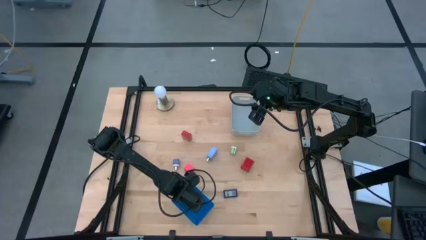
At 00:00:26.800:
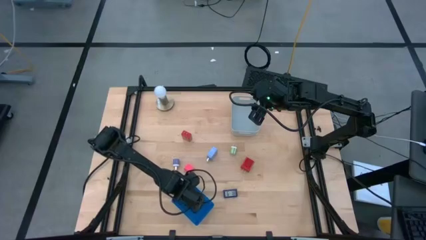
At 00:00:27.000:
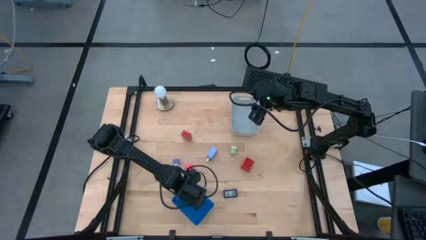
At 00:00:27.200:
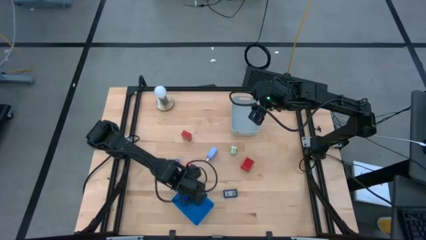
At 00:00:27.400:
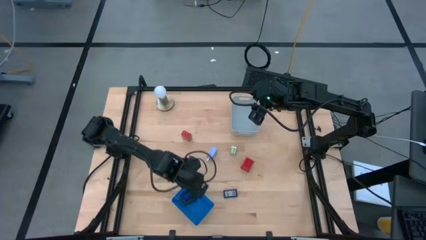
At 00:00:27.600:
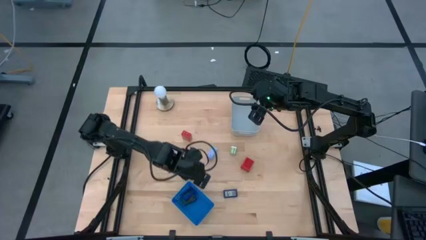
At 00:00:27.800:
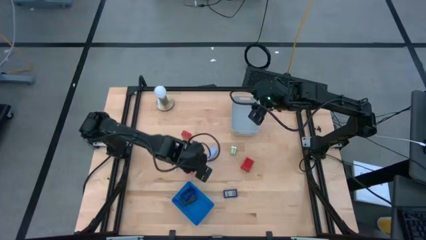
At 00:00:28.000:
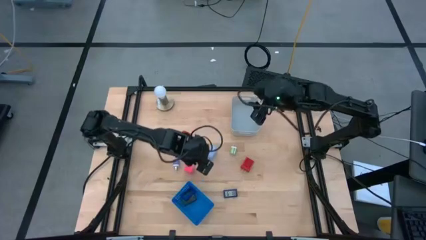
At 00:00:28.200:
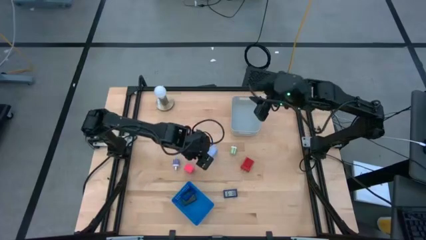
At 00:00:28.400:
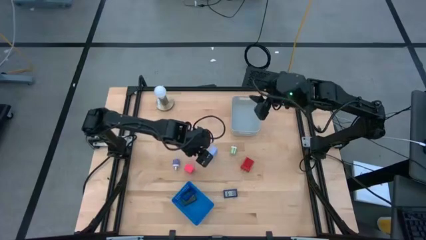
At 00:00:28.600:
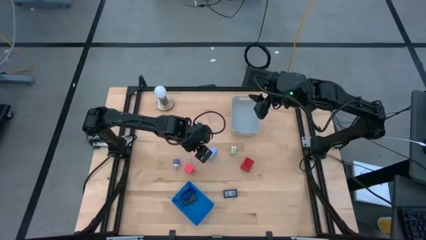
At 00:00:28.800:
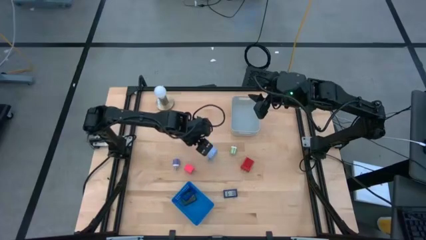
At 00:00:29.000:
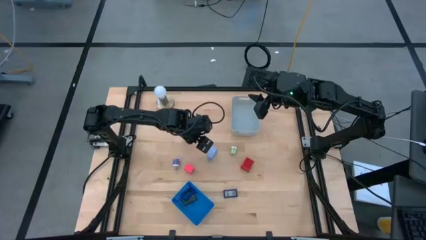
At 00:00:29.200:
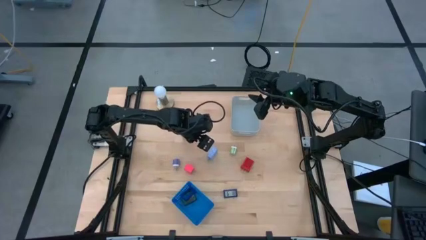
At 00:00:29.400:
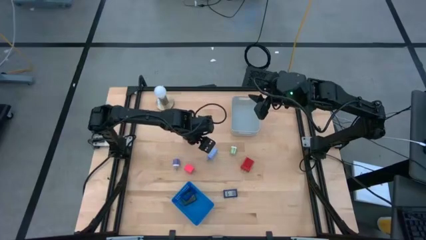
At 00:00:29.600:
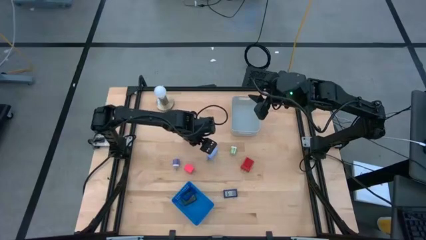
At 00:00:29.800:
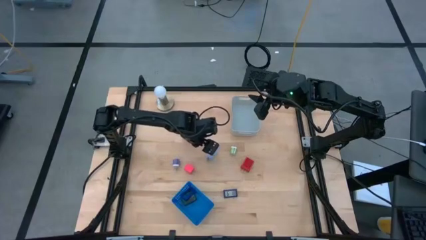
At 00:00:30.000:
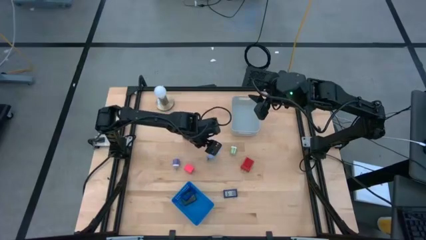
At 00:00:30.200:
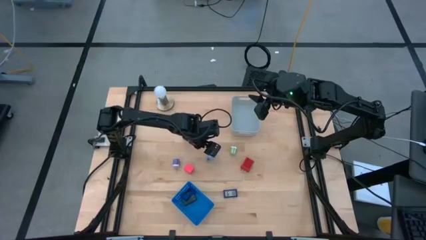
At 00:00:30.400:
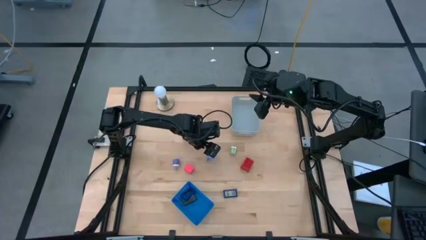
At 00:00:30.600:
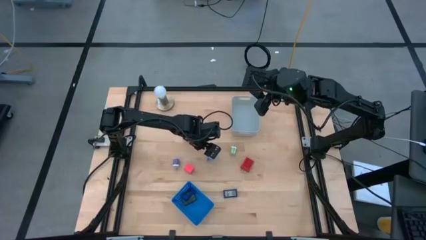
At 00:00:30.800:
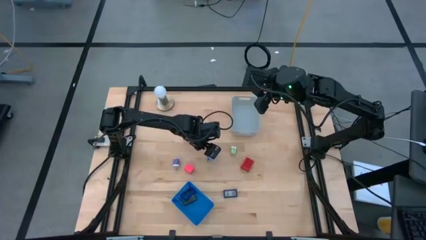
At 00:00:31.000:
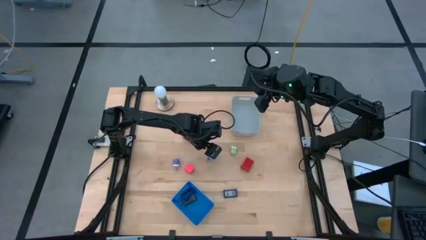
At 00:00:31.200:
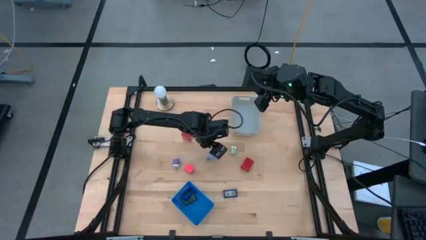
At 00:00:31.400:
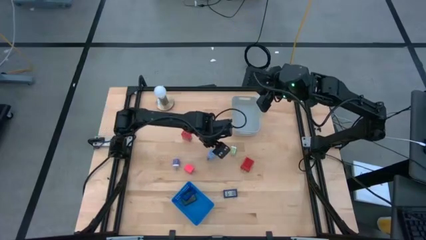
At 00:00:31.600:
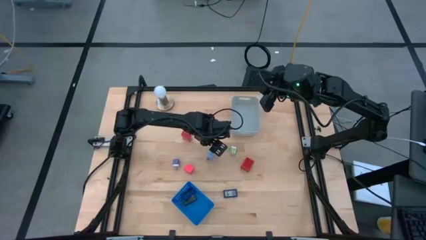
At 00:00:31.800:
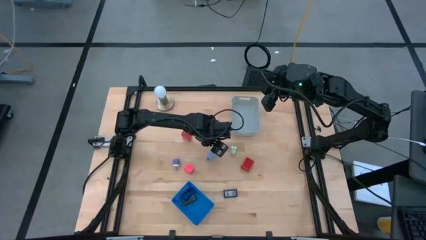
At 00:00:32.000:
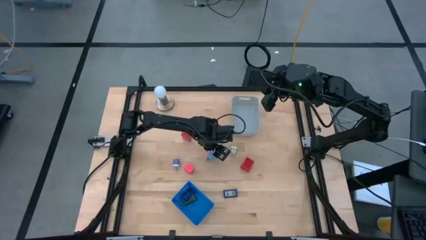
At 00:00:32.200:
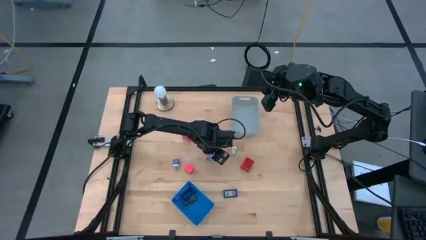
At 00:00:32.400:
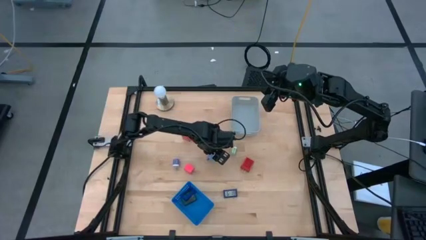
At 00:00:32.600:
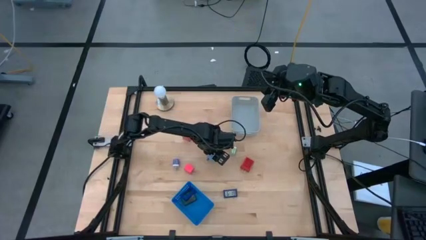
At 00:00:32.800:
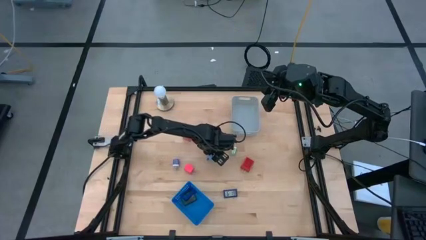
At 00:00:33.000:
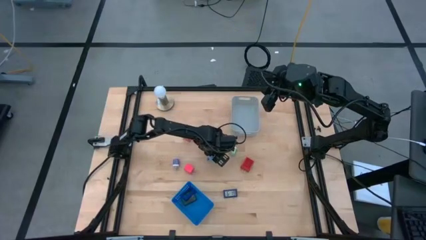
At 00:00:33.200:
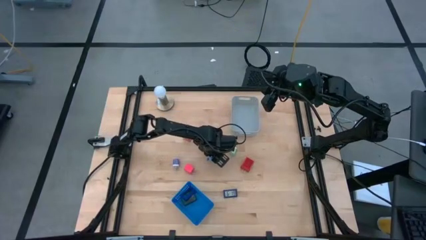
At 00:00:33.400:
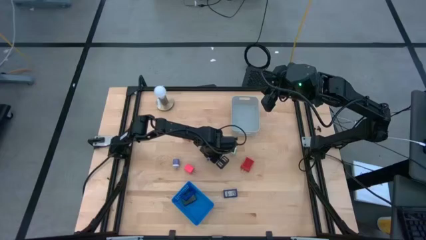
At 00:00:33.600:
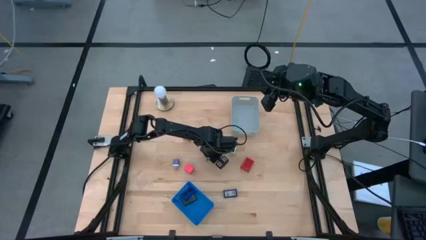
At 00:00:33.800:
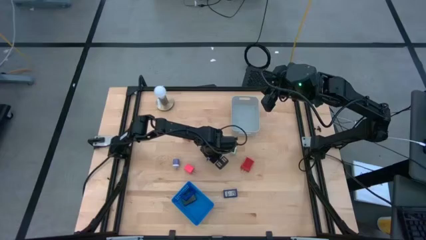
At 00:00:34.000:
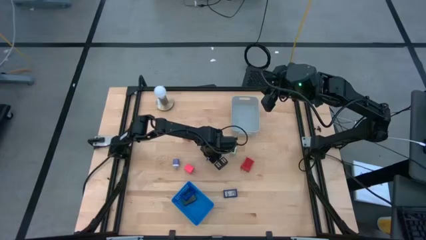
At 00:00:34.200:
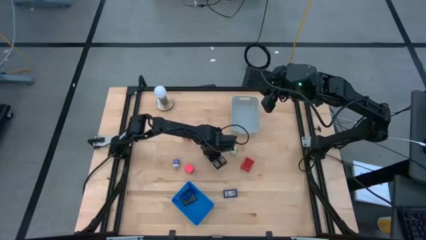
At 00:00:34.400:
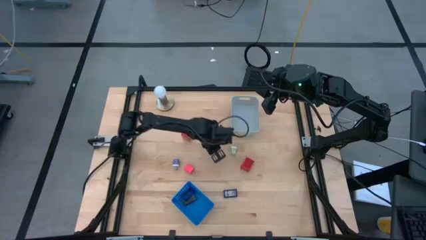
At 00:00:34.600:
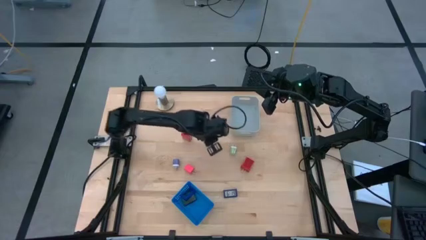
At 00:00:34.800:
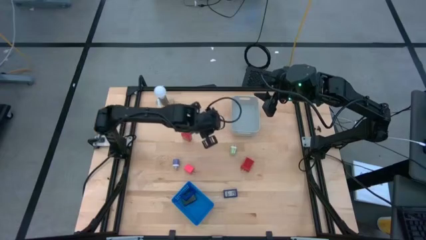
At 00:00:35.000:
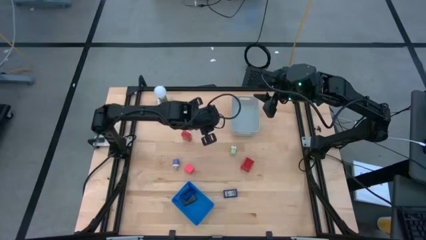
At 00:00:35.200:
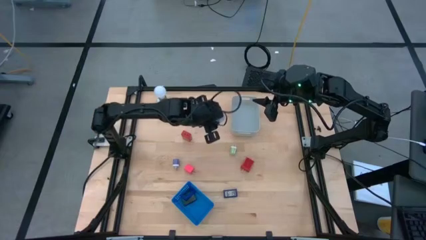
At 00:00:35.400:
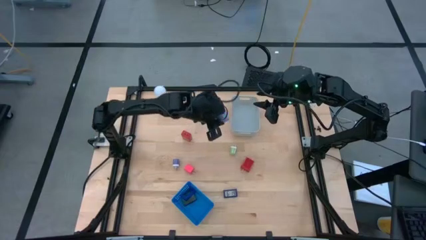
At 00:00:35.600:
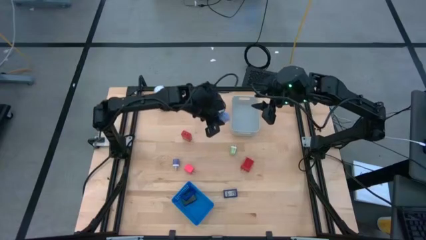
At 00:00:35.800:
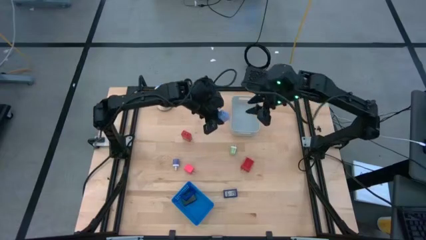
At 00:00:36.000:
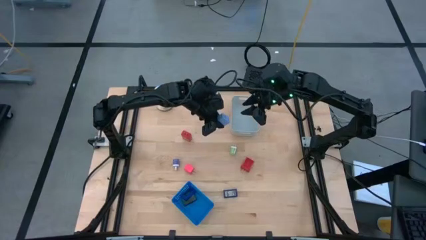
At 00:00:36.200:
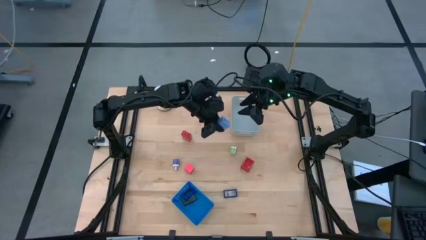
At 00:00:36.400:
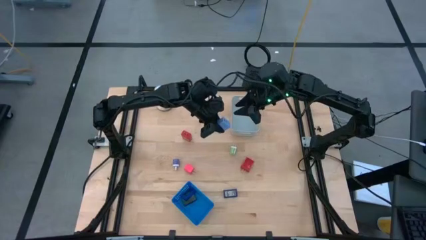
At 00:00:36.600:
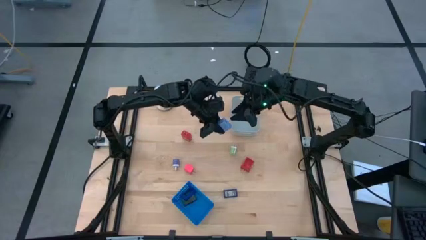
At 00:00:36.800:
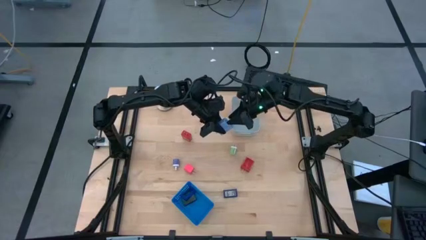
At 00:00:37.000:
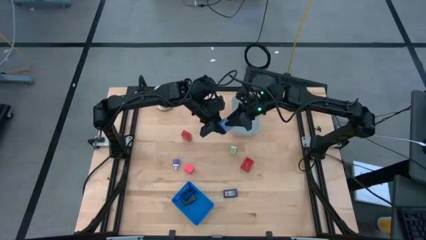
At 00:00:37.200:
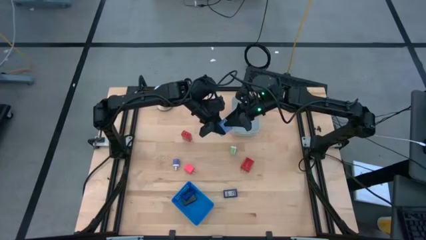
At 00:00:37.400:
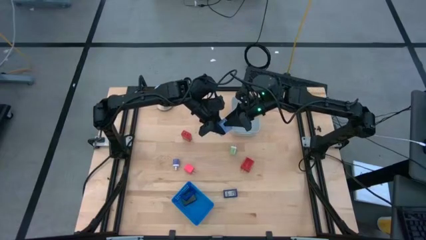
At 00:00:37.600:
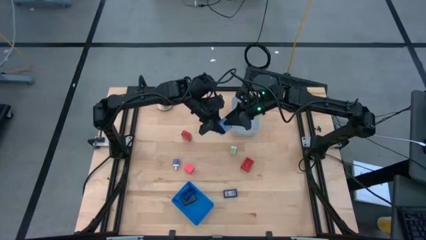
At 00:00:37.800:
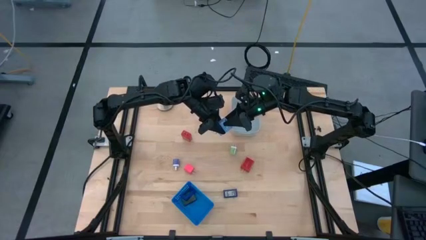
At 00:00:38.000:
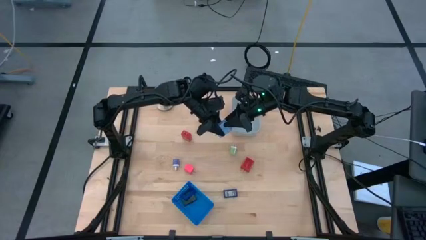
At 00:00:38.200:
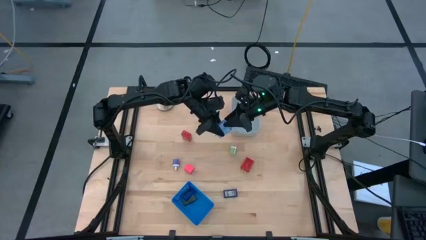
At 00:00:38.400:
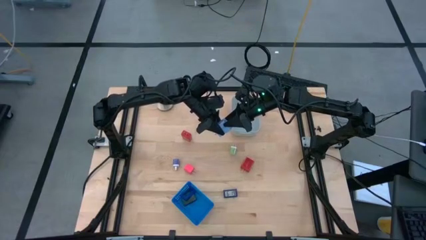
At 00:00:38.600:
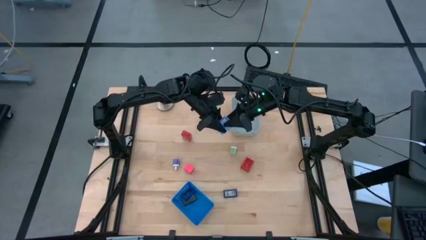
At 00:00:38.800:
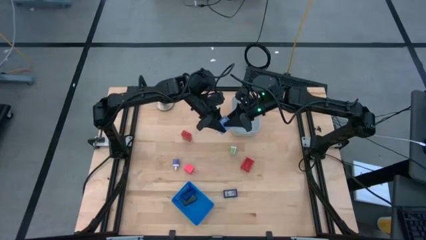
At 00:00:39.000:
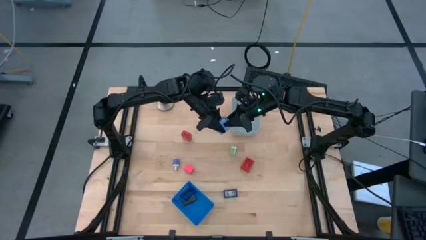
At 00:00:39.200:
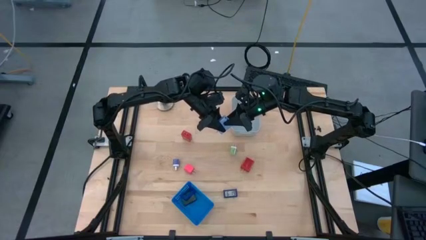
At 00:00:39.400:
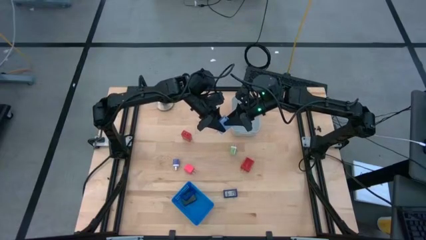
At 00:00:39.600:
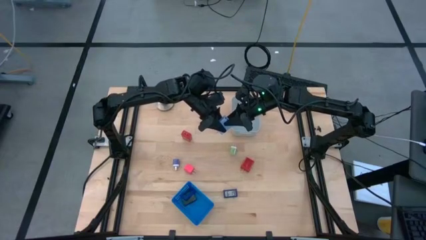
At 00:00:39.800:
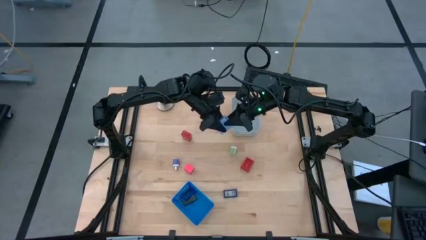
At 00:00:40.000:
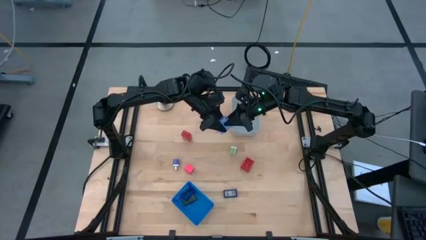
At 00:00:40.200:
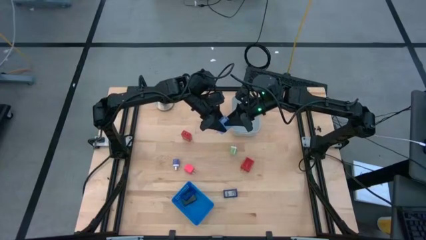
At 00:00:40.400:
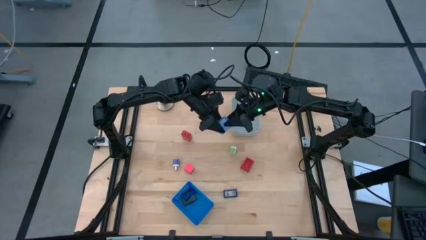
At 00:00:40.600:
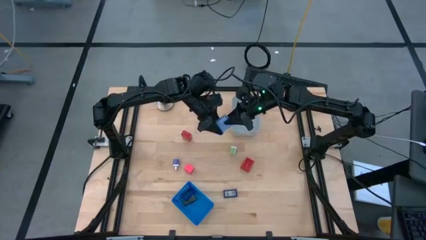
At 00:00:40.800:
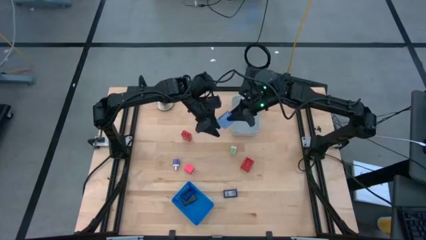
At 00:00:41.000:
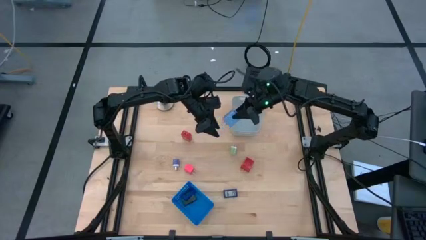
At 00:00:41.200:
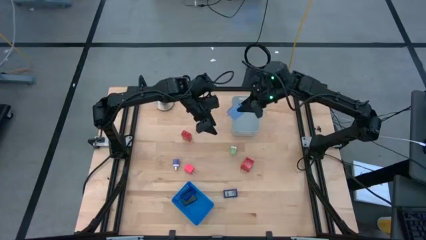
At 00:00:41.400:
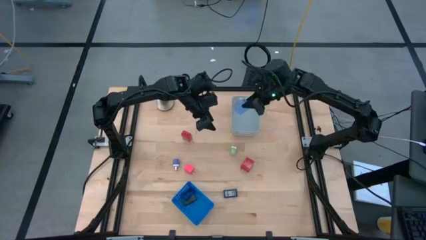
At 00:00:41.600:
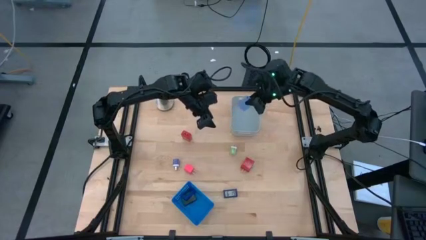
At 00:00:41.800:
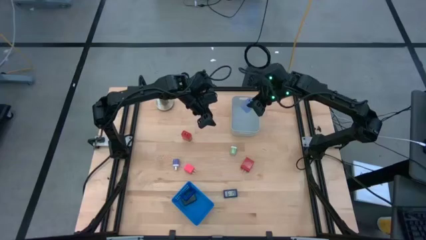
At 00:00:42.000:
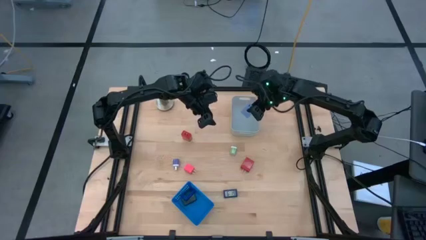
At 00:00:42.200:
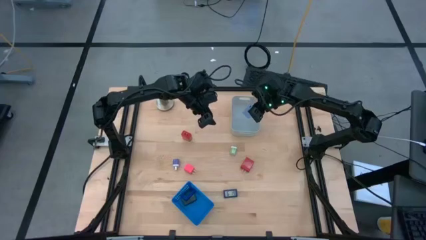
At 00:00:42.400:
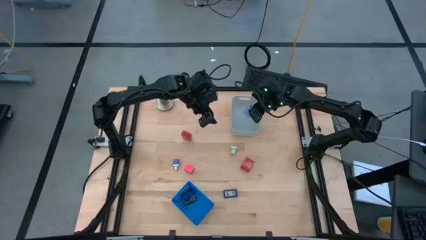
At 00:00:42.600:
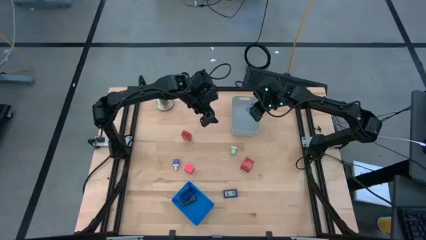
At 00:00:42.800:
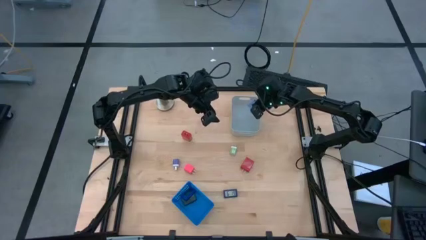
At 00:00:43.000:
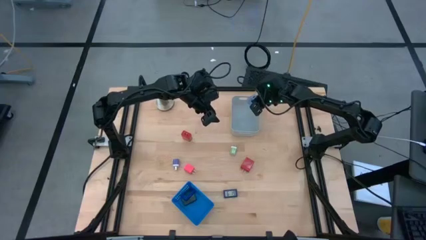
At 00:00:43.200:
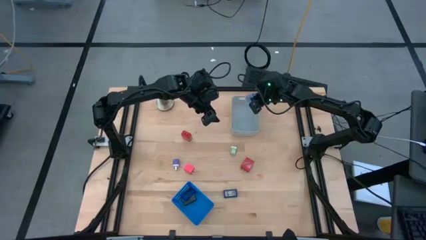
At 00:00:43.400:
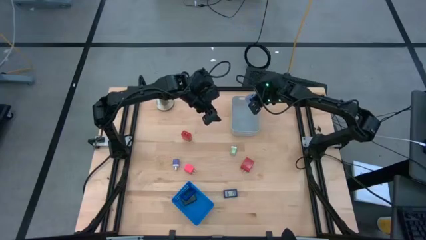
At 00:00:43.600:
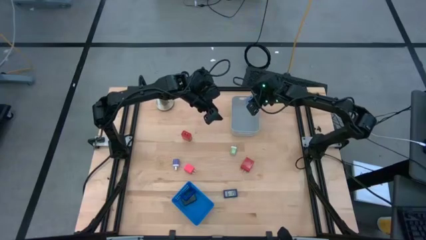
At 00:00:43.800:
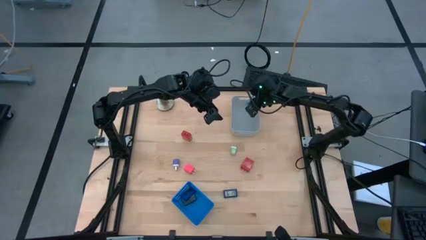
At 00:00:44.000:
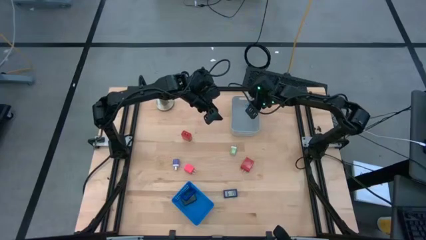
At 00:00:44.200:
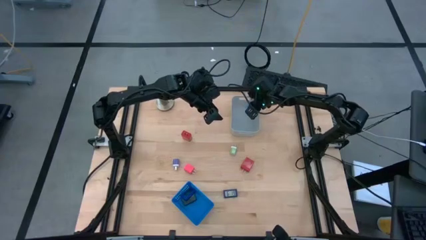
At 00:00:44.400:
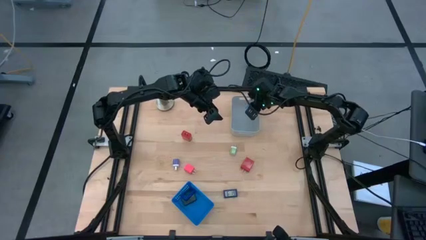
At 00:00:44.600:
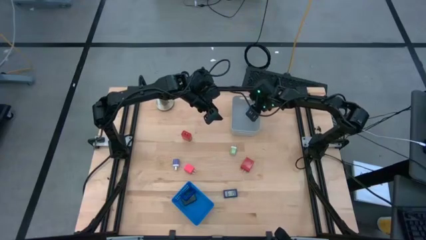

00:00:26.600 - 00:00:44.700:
Task: Pick & Place Office items
Put the light blue charger adapter into the gray bin
